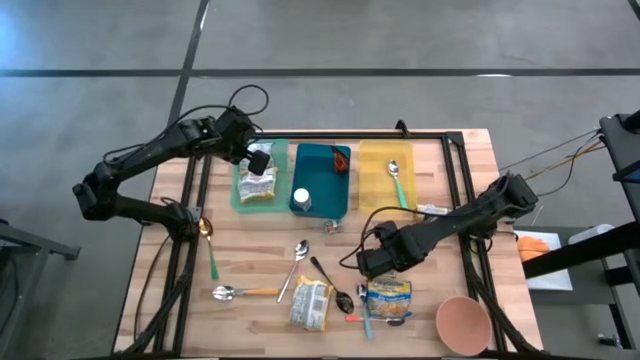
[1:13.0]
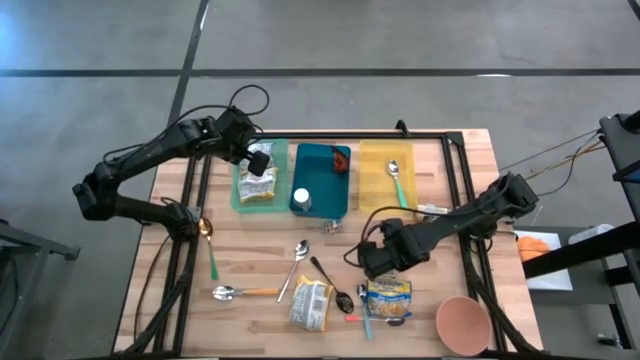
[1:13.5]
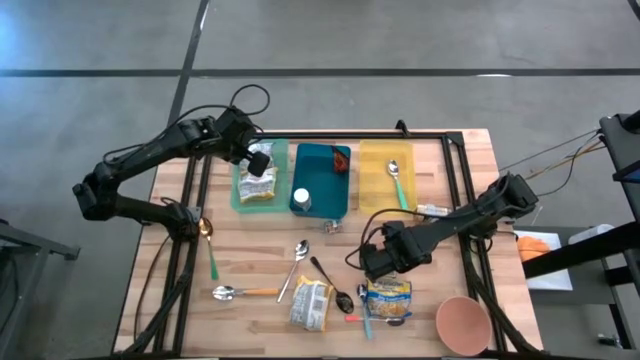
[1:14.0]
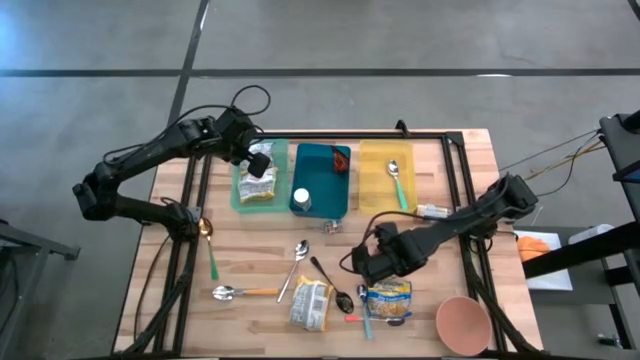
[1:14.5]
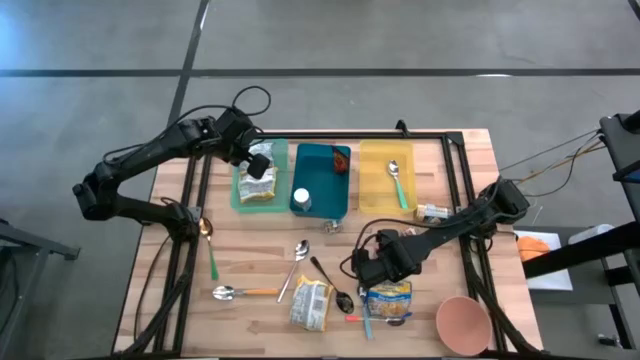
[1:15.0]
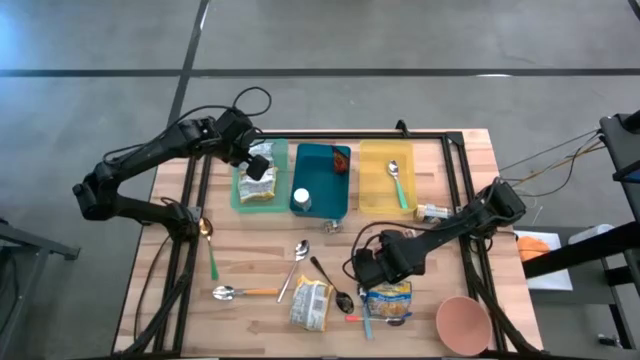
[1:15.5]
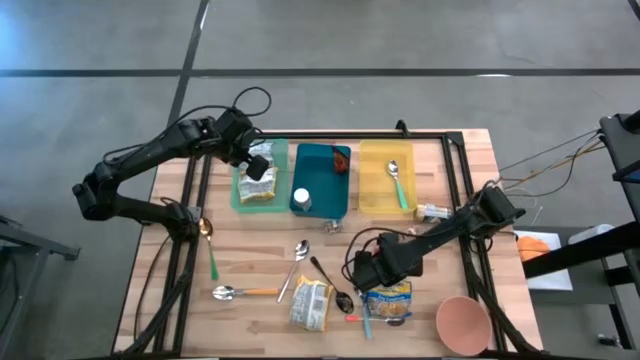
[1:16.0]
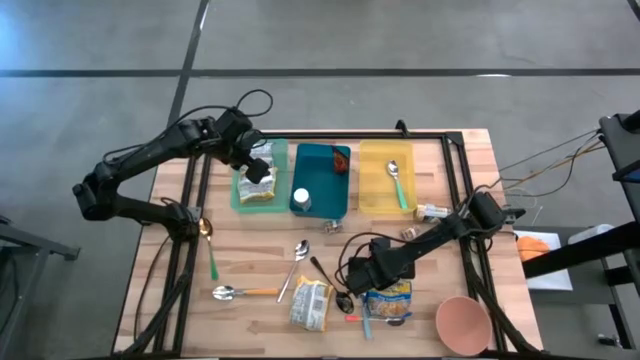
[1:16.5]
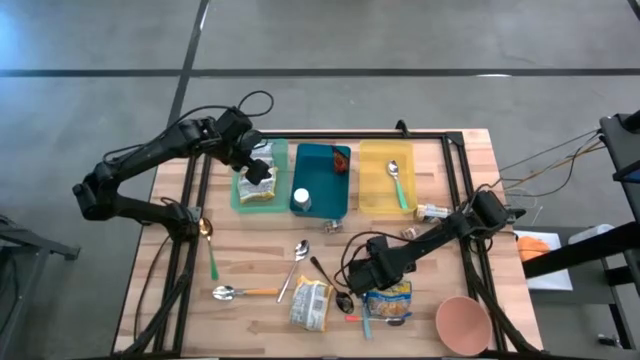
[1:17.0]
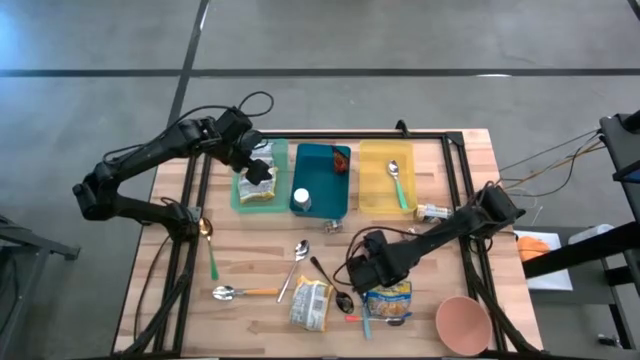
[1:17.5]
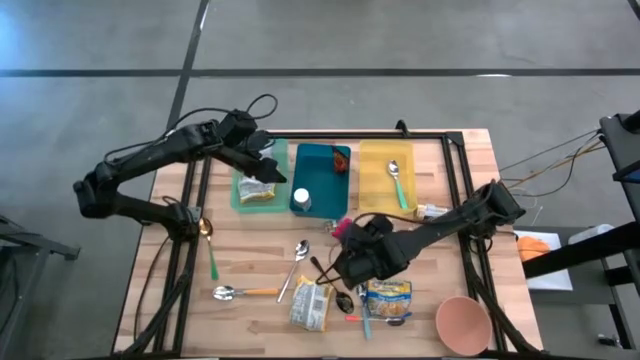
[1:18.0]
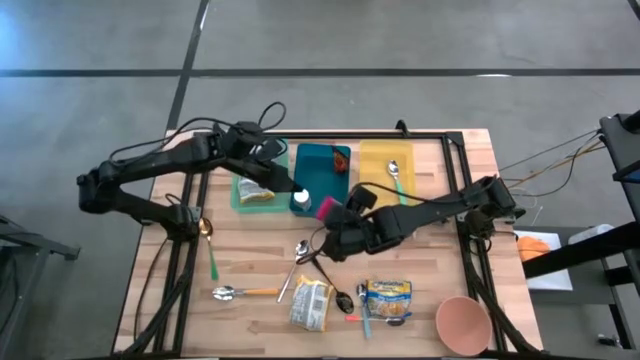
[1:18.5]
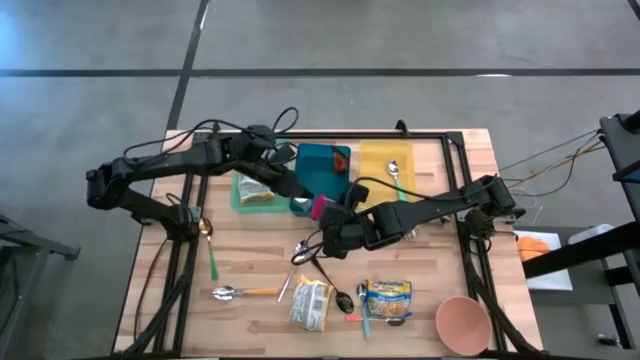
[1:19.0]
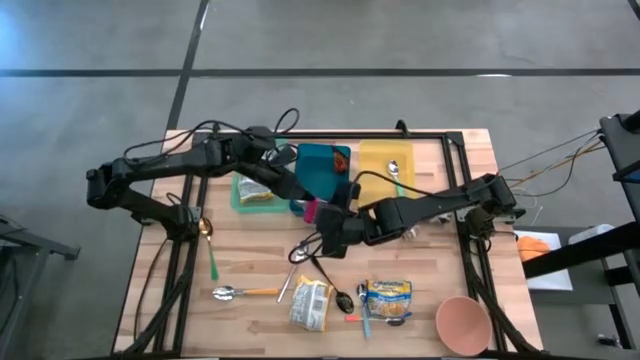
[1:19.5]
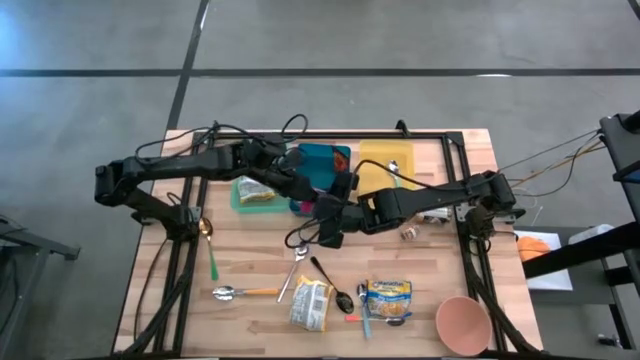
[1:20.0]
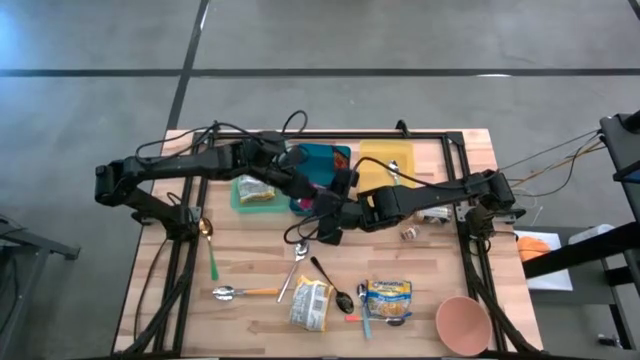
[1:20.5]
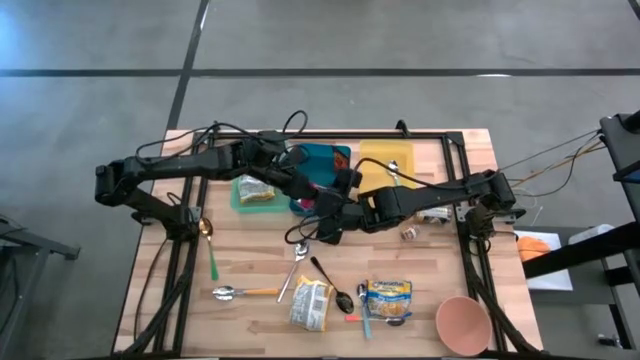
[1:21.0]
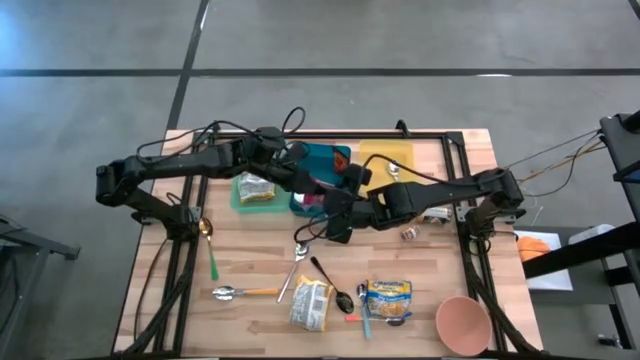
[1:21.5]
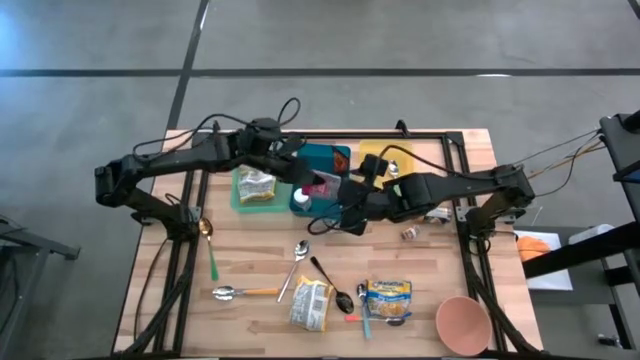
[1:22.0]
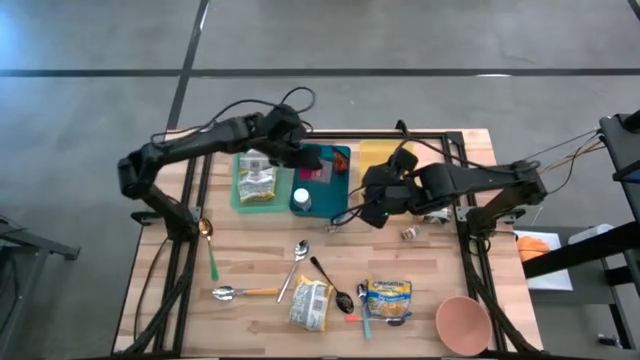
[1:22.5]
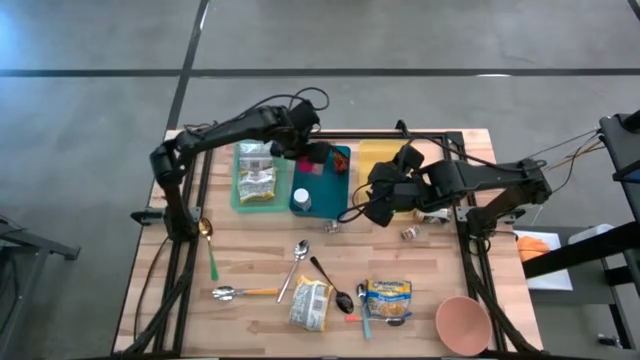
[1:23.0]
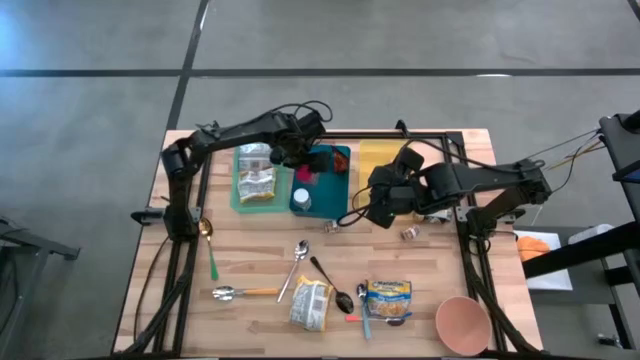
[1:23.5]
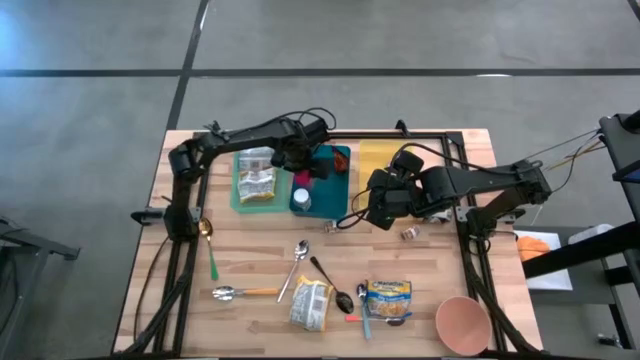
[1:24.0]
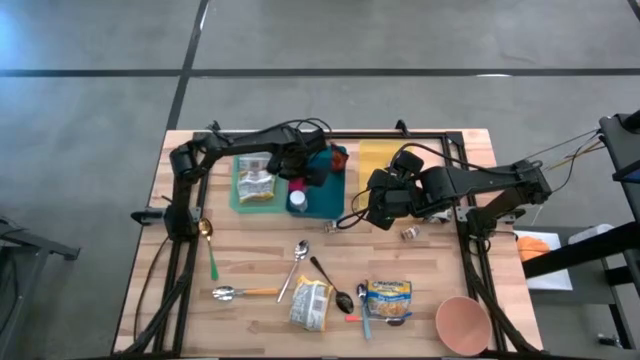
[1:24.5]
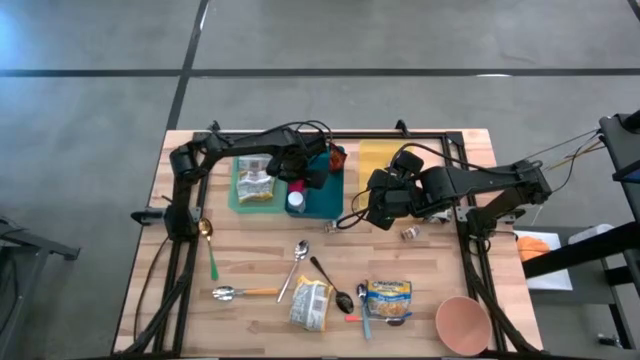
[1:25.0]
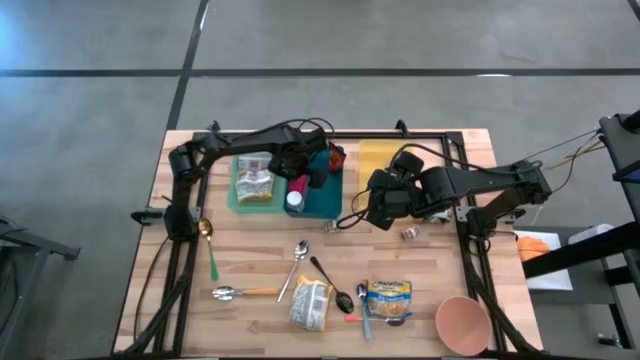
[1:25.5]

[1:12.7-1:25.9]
Put the red seasoning can into the blue bin

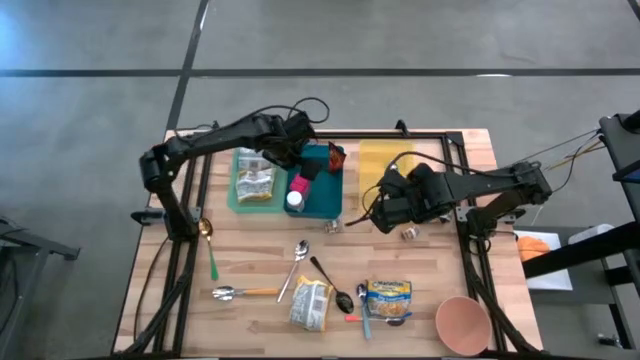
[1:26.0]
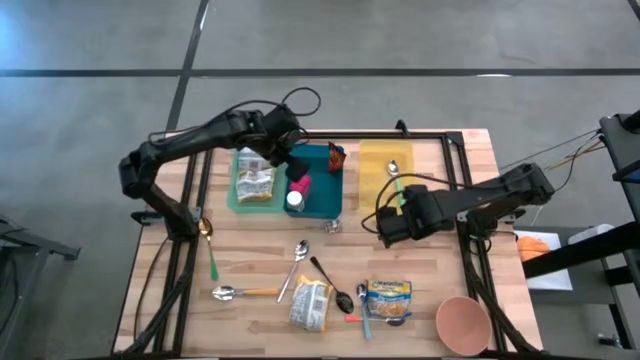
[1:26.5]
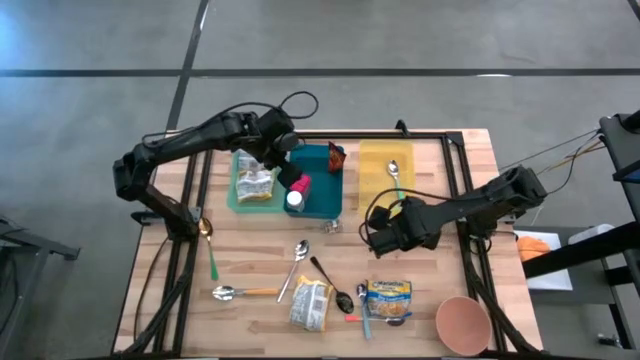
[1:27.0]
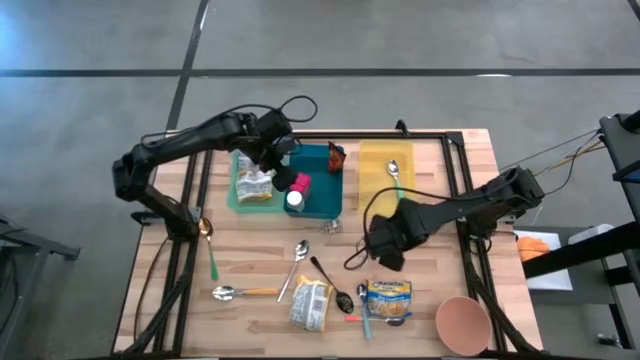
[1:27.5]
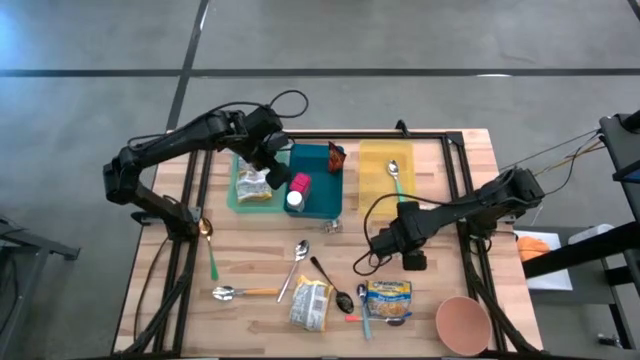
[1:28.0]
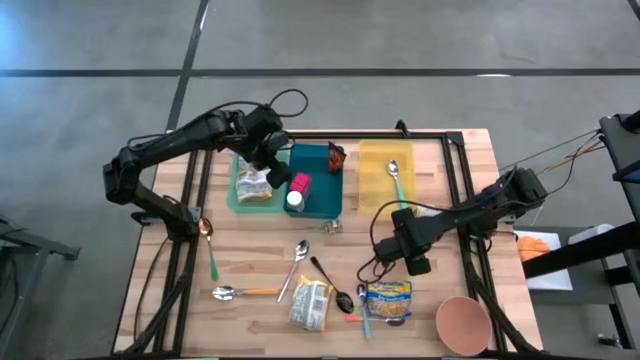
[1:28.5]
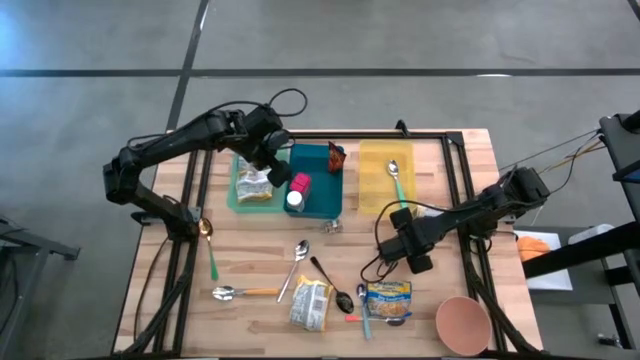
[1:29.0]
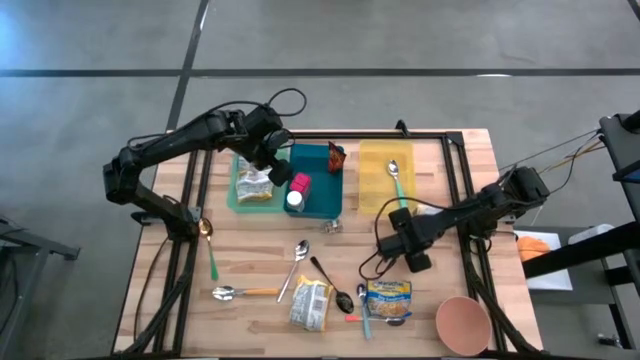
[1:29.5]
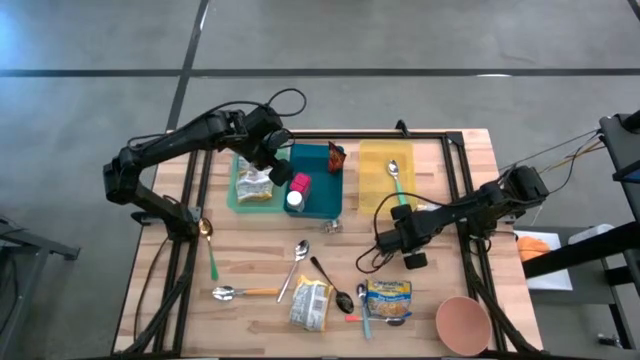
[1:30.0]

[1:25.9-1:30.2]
Put the right brown seasoning bottle into the blue bin
